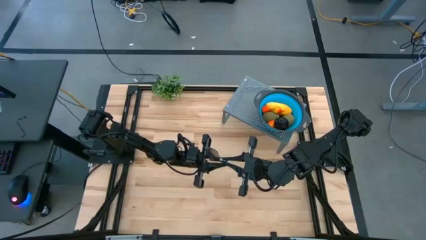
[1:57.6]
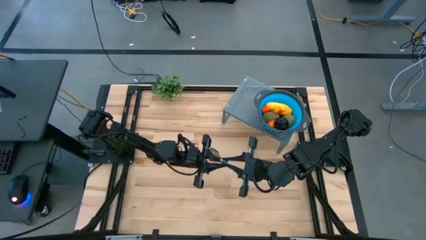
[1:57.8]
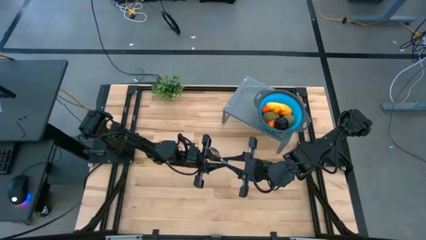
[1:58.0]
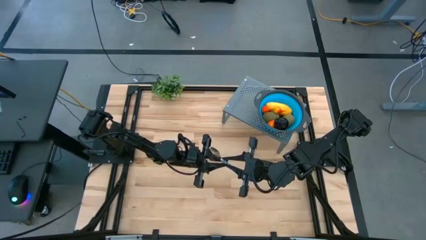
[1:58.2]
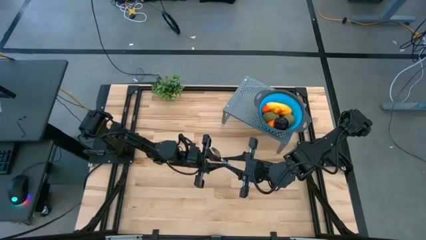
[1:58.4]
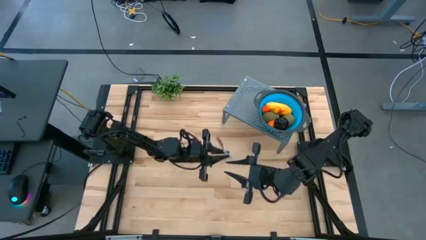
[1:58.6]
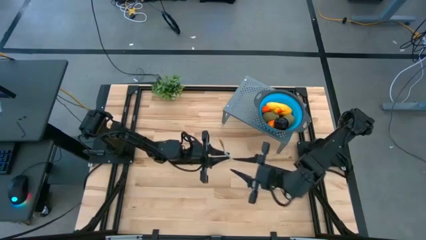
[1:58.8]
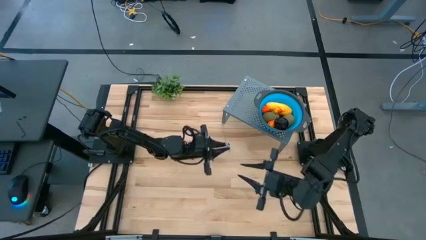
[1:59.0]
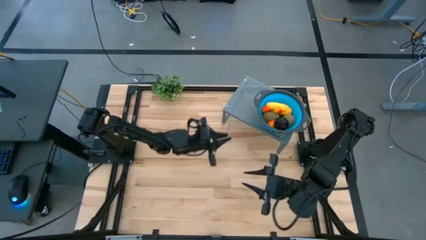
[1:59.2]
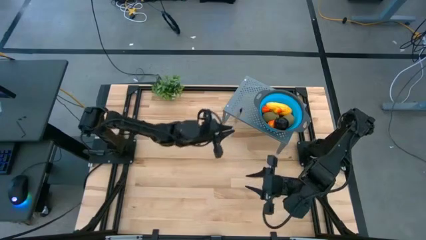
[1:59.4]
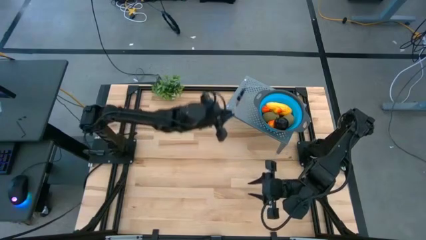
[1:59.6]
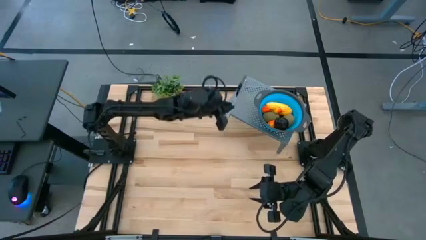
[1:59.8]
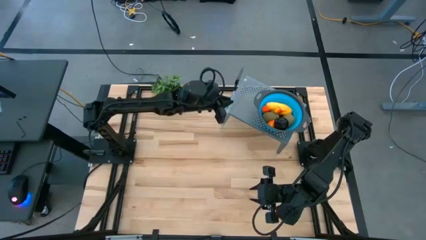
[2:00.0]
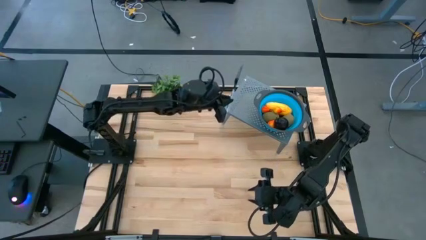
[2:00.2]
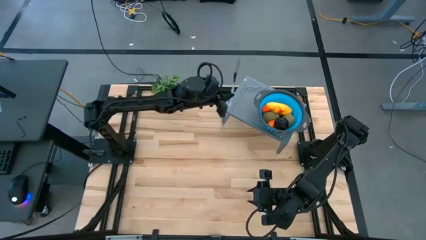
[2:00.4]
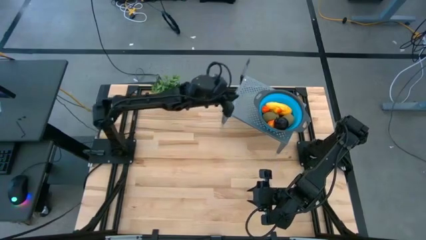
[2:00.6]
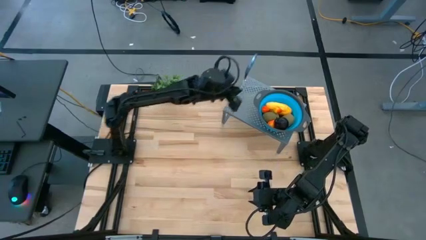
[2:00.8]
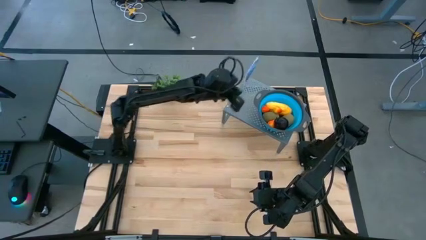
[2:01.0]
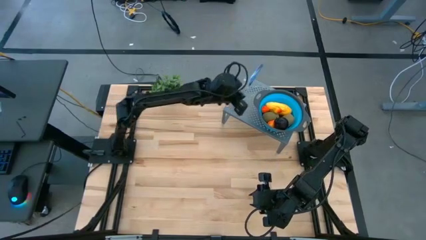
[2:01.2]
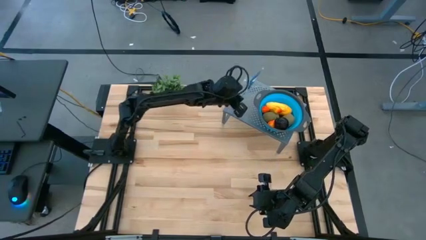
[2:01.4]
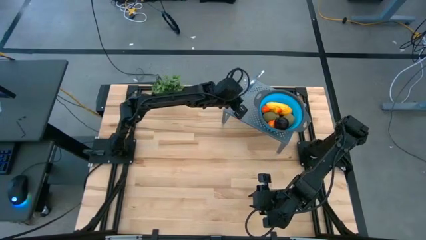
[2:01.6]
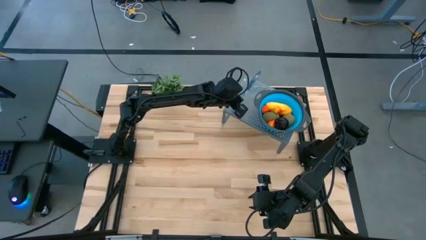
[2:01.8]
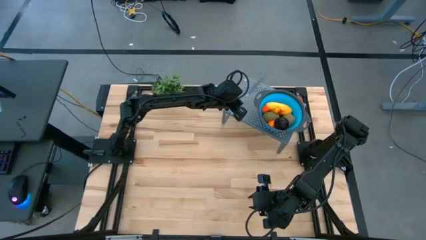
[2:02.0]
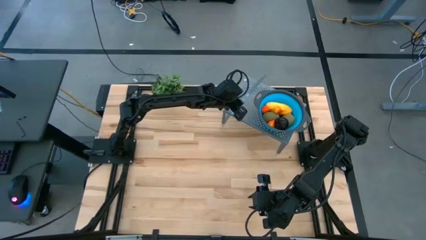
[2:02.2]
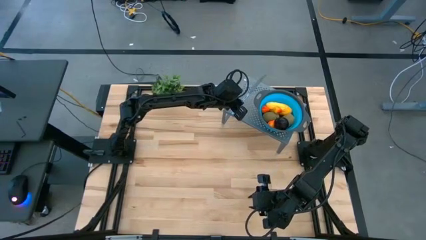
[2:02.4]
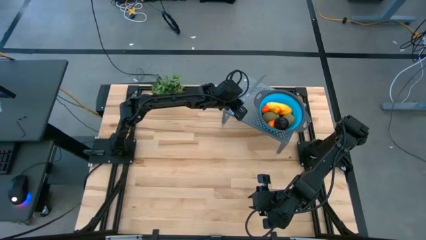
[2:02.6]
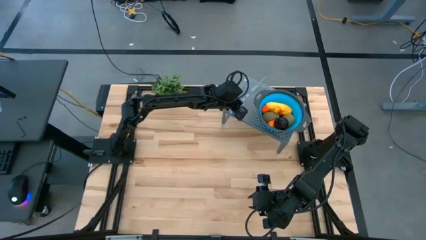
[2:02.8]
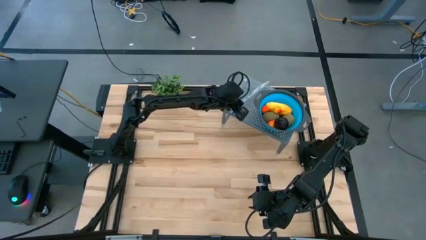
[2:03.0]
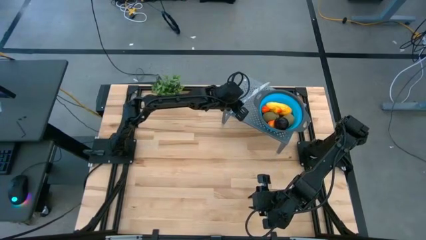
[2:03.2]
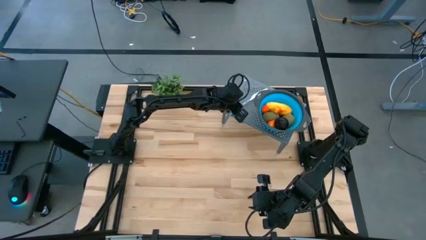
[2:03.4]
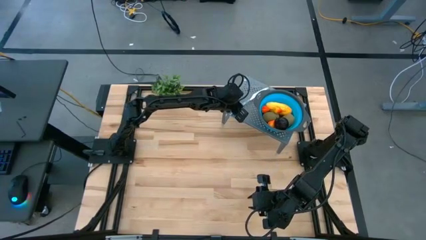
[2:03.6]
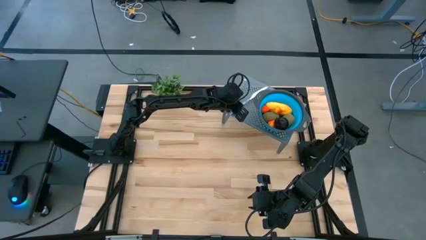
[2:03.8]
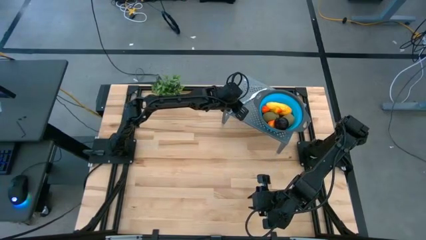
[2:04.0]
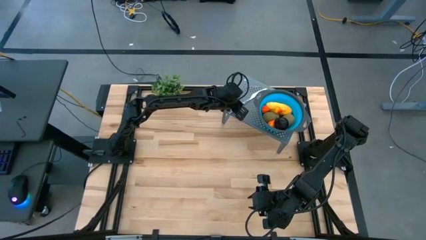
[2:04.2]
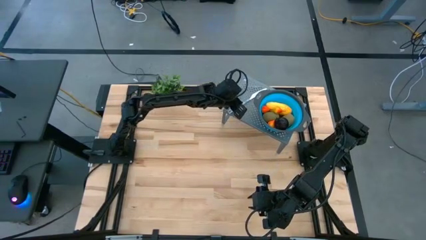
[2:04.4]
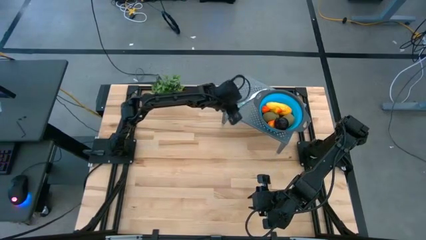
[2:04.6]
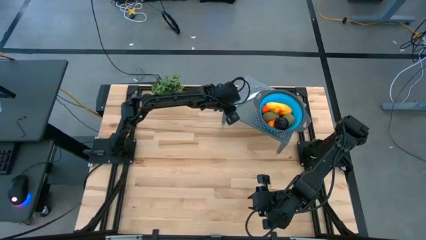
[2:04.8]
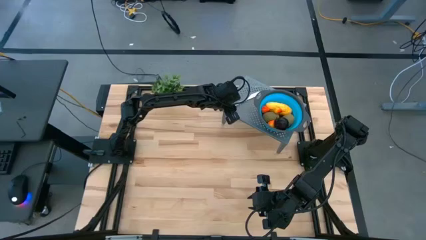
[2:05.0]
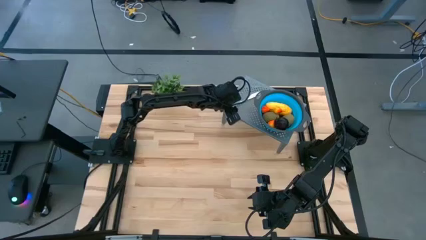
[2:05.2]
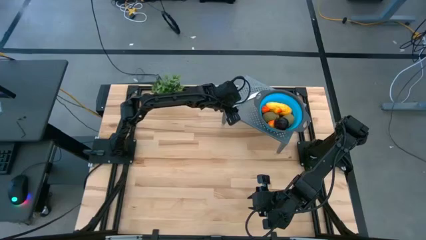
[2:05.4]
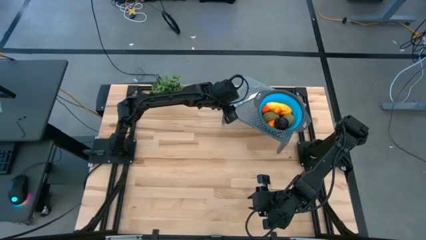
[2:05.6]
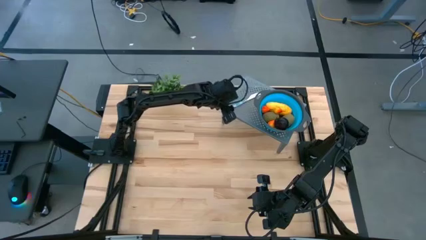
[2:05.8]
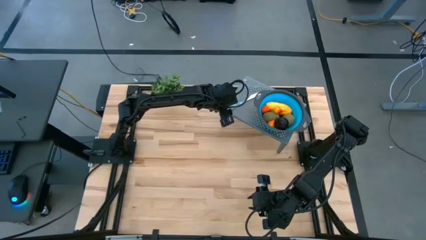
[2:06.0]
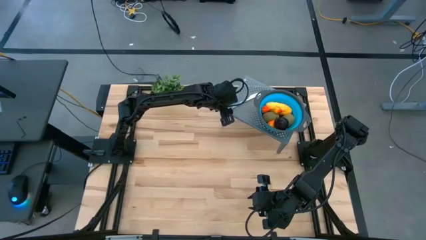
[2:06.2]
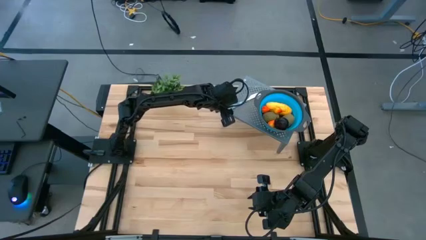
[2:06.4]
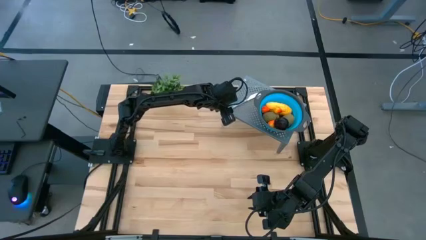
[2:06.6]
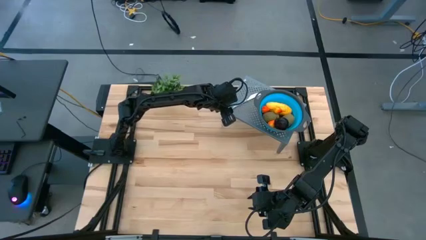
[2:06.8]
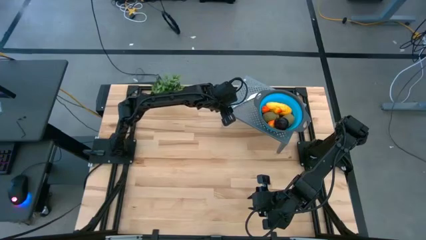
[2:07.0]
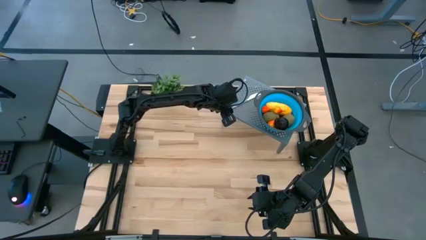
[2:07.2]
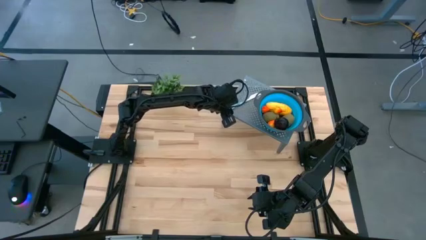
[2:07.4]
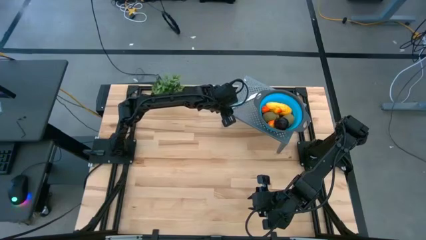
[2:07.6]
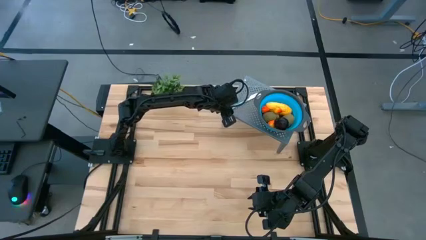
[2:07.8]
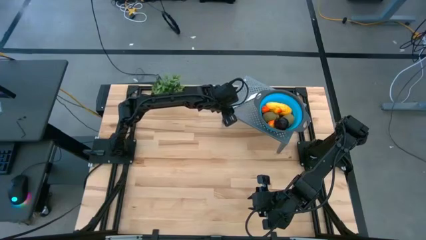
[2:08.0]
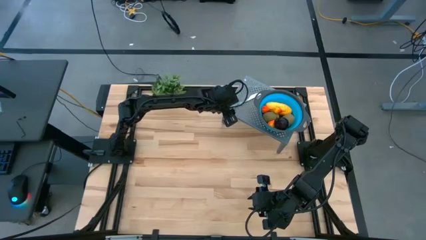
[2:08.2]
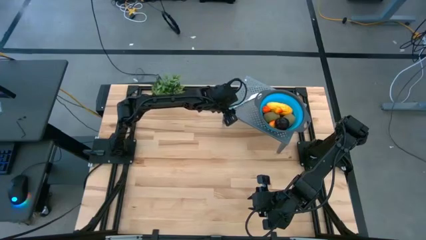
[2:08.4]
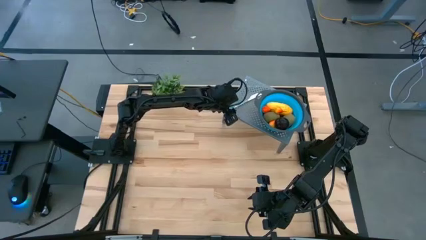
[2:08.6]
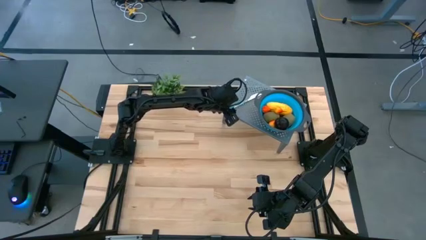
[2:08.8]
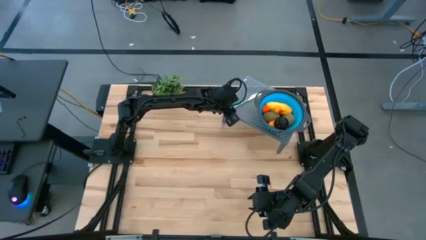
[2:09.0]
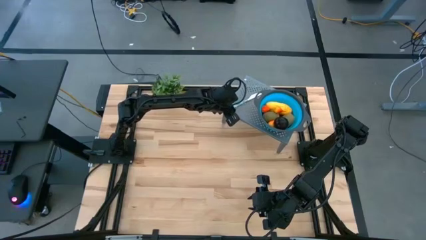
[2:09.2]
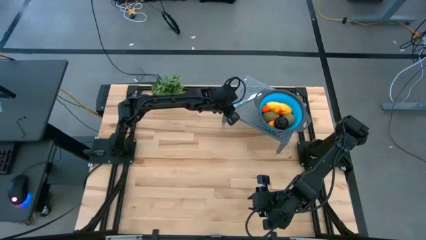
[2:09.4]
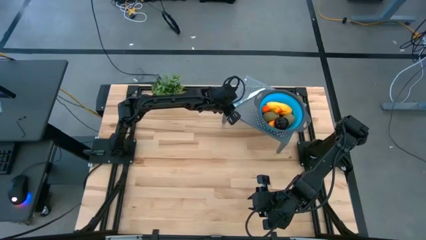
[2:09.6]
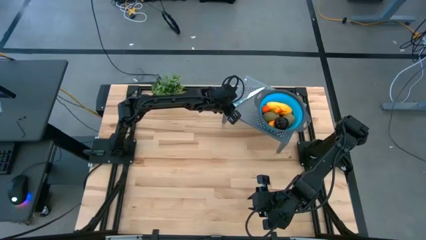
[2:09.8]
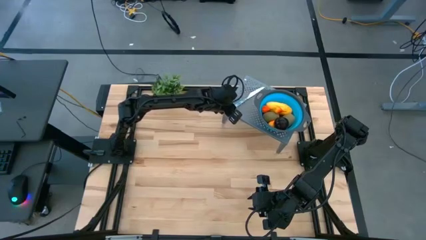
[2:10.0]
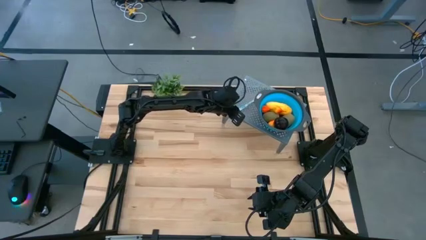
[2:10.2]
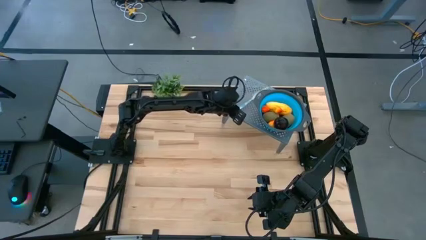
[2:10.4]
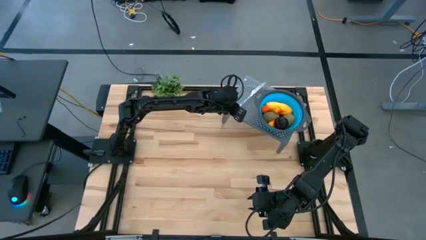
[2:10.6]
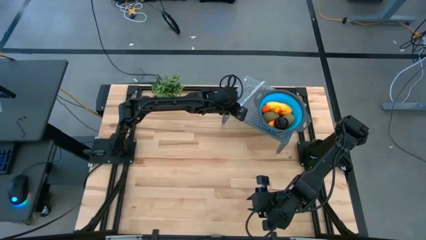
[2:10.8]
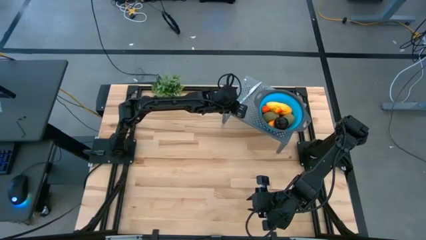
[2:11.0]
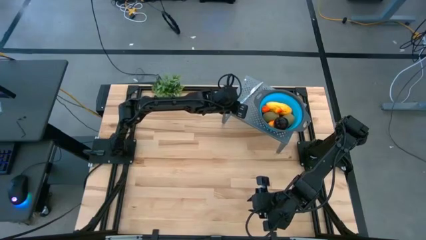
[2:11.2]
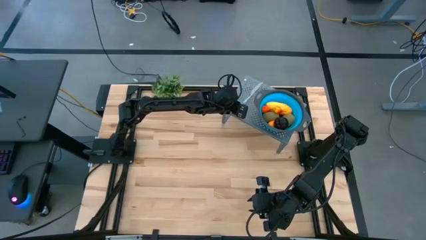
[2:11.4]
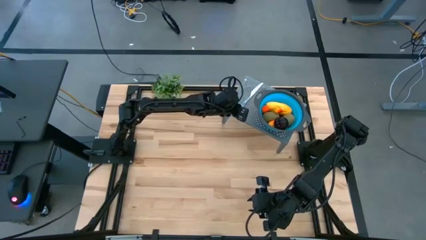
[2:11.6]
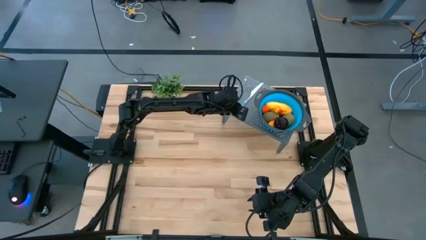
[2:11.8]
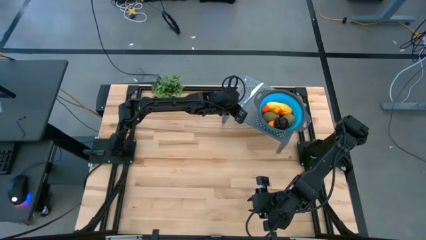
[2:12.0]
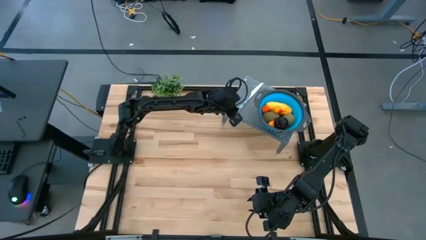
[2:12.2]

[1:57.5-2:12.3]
Task: Pick & Place Fruit
Put the knife on the shelf
